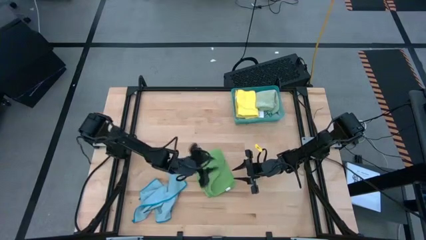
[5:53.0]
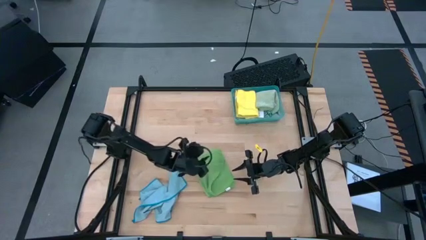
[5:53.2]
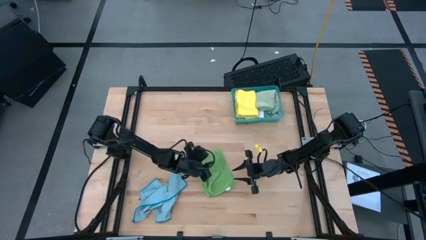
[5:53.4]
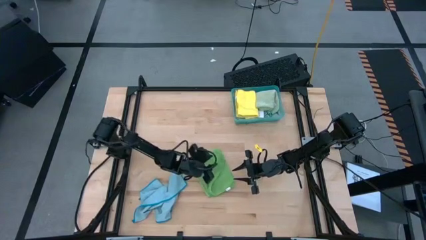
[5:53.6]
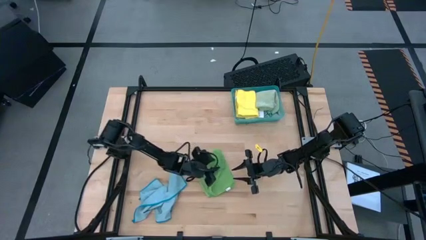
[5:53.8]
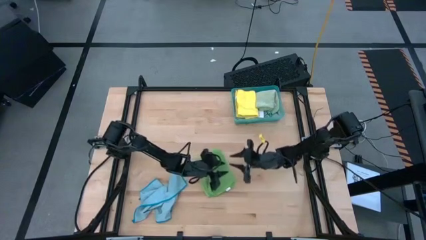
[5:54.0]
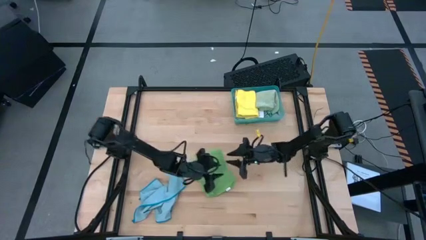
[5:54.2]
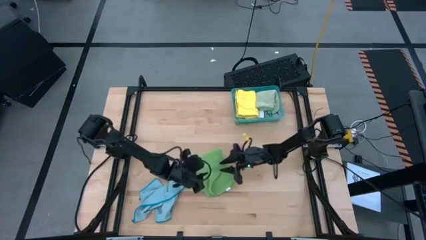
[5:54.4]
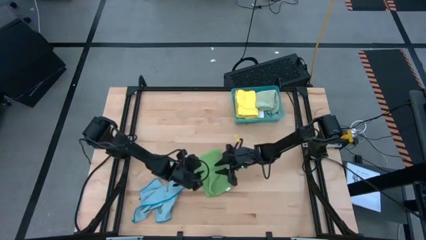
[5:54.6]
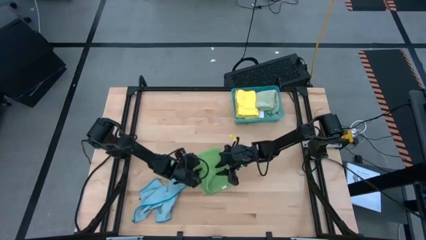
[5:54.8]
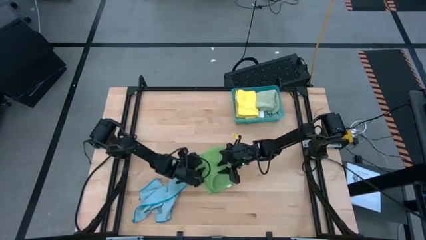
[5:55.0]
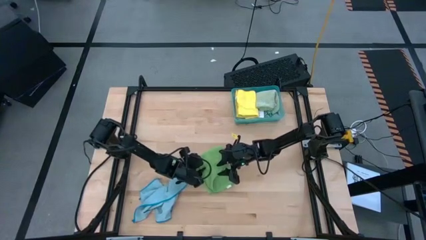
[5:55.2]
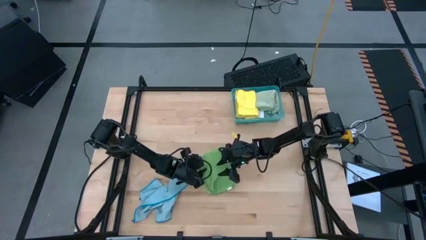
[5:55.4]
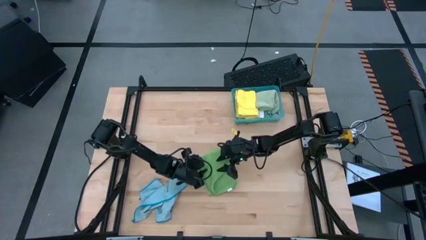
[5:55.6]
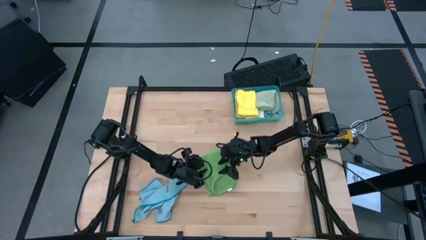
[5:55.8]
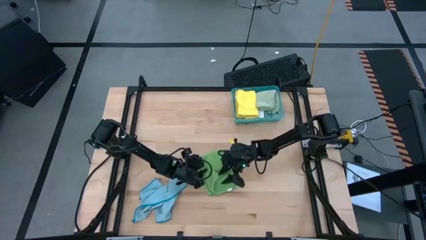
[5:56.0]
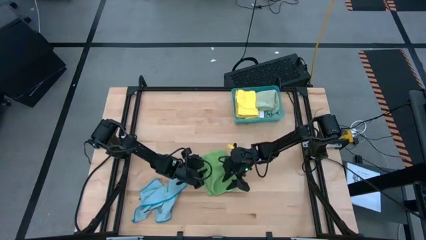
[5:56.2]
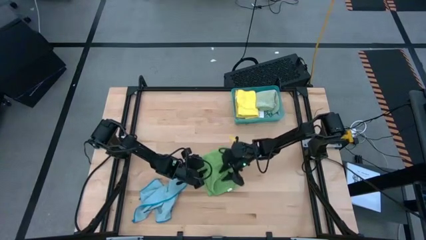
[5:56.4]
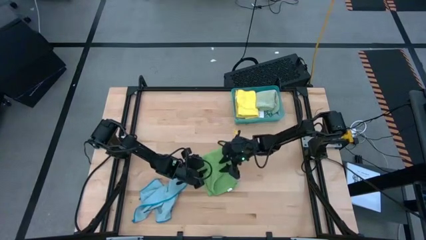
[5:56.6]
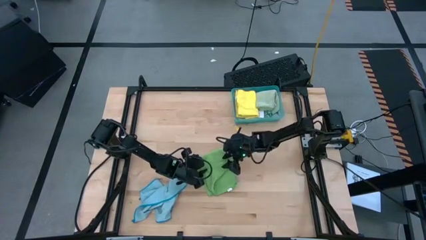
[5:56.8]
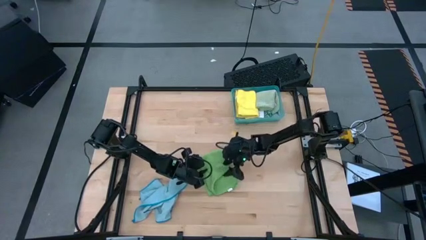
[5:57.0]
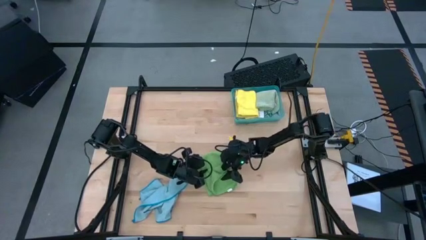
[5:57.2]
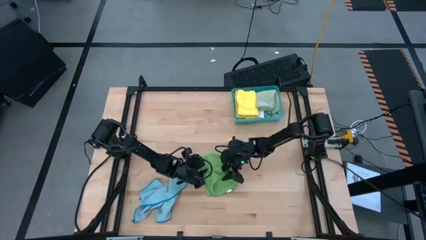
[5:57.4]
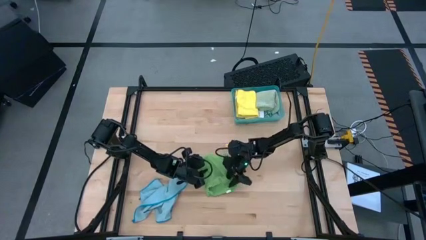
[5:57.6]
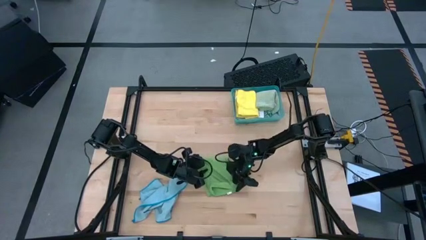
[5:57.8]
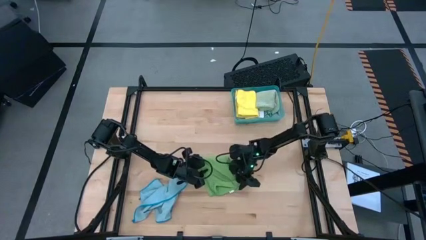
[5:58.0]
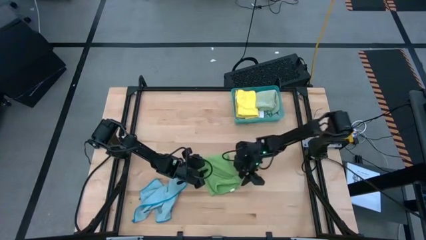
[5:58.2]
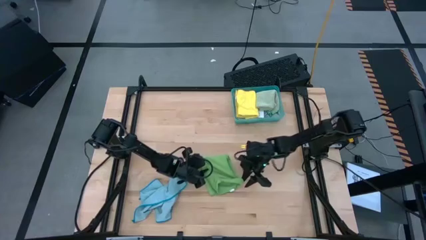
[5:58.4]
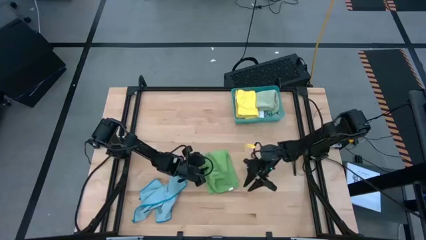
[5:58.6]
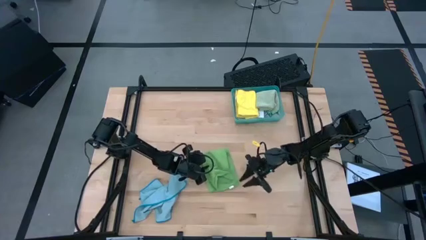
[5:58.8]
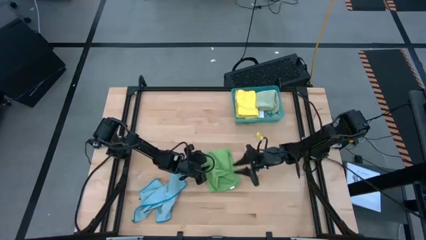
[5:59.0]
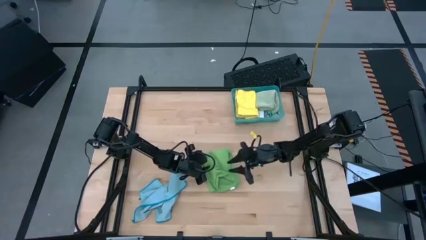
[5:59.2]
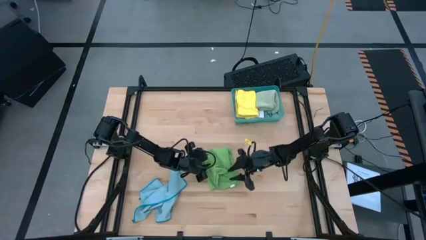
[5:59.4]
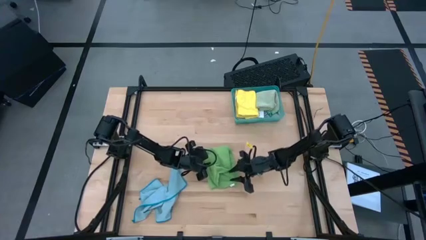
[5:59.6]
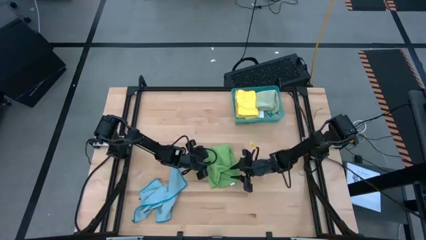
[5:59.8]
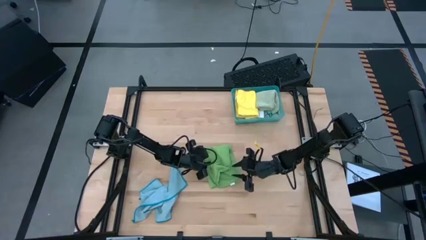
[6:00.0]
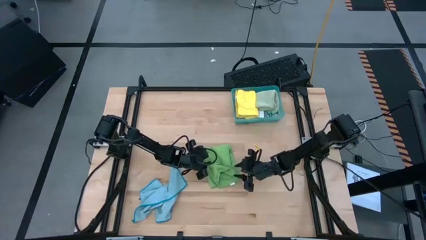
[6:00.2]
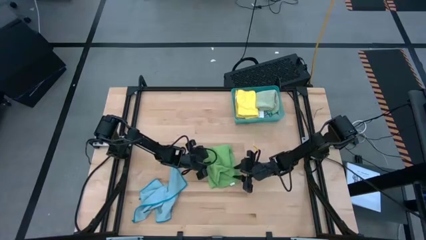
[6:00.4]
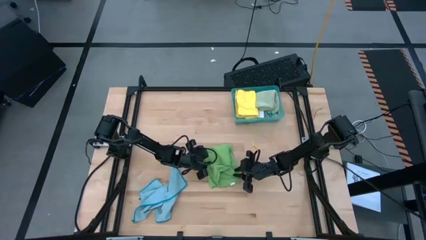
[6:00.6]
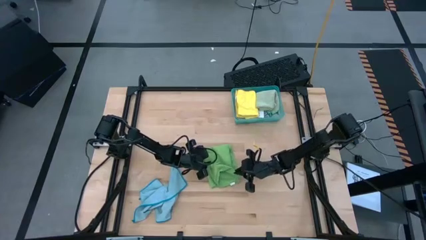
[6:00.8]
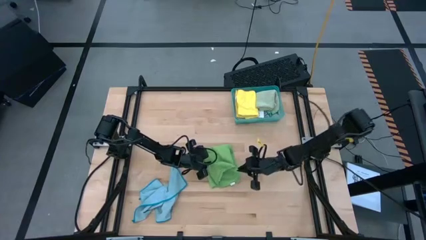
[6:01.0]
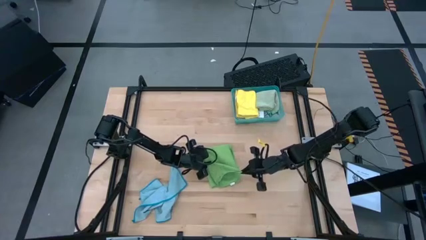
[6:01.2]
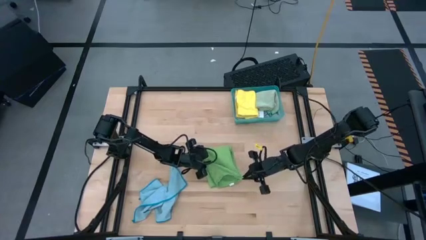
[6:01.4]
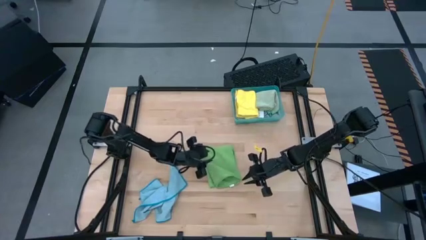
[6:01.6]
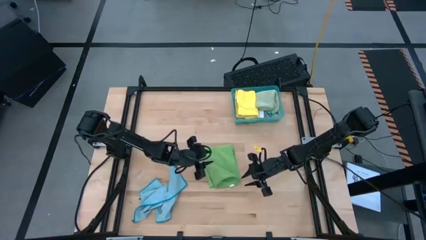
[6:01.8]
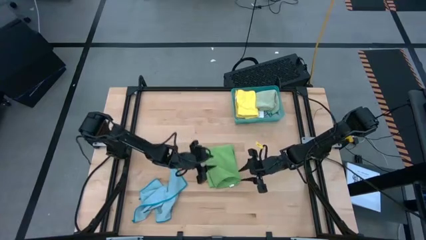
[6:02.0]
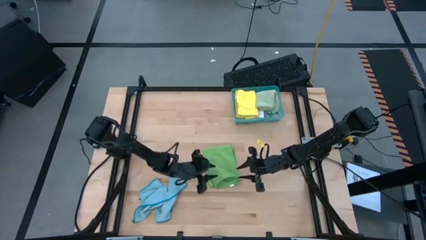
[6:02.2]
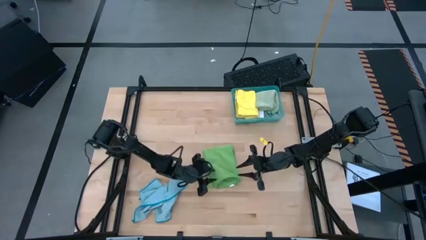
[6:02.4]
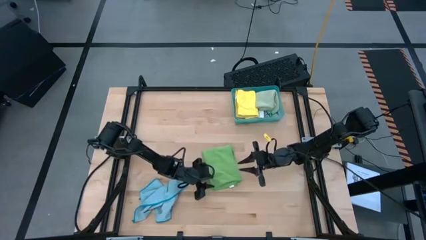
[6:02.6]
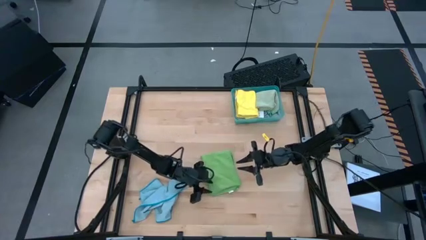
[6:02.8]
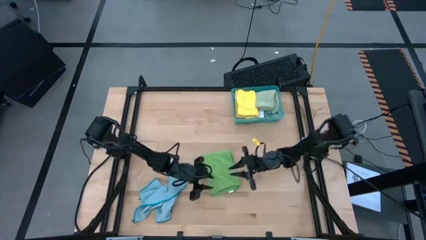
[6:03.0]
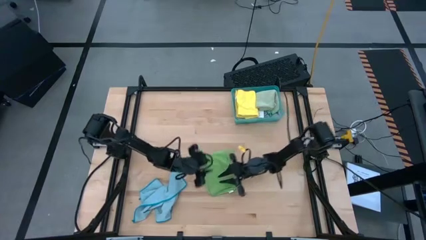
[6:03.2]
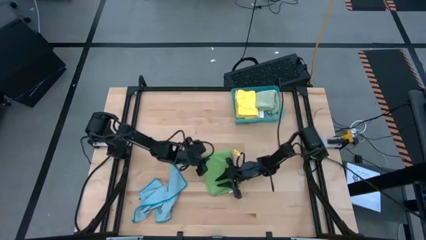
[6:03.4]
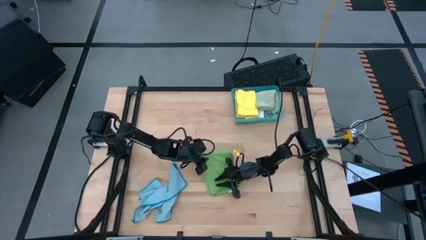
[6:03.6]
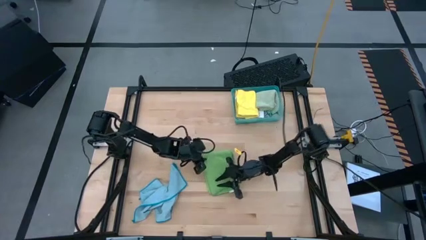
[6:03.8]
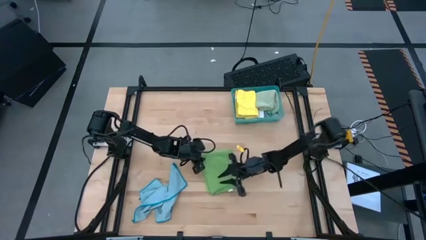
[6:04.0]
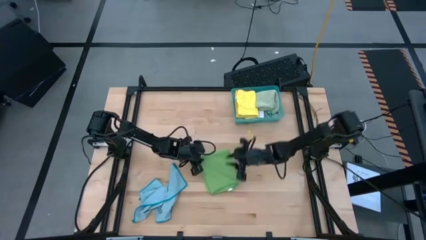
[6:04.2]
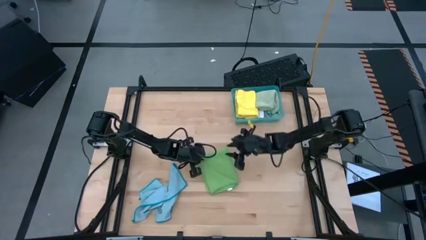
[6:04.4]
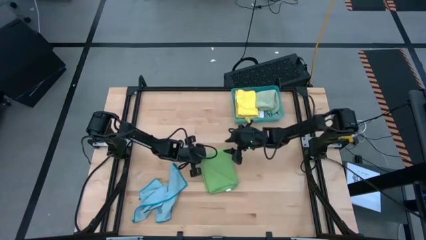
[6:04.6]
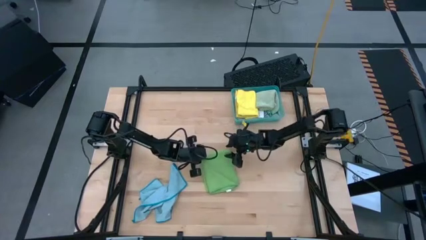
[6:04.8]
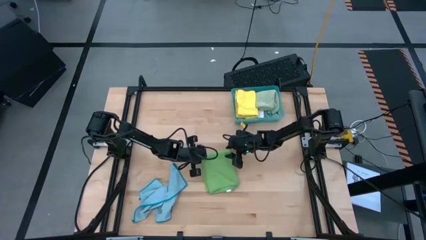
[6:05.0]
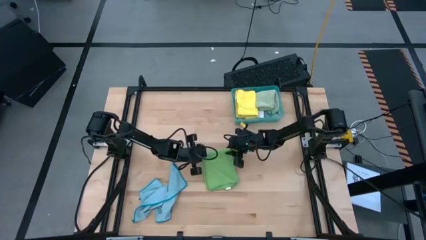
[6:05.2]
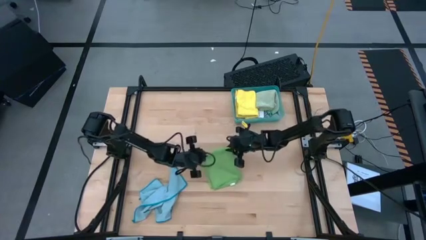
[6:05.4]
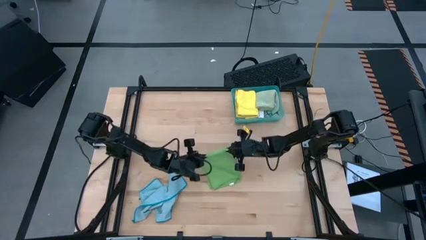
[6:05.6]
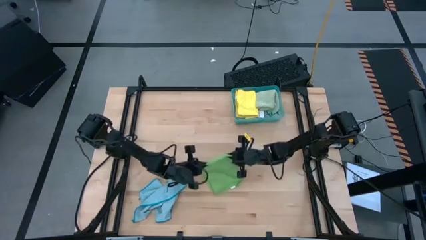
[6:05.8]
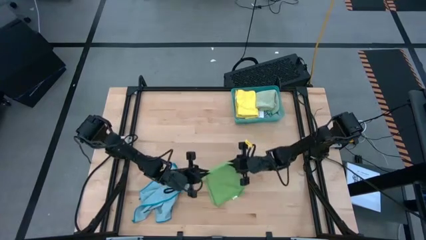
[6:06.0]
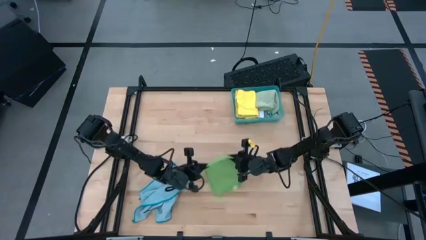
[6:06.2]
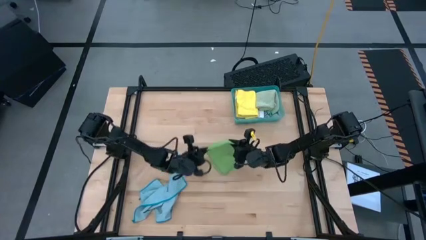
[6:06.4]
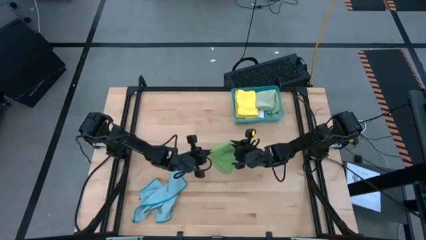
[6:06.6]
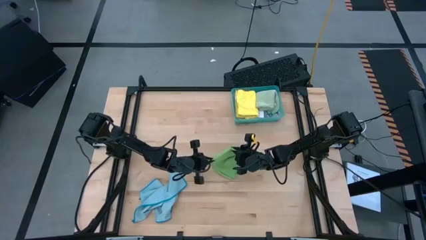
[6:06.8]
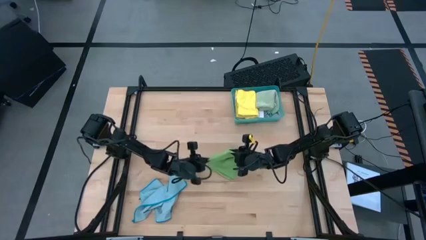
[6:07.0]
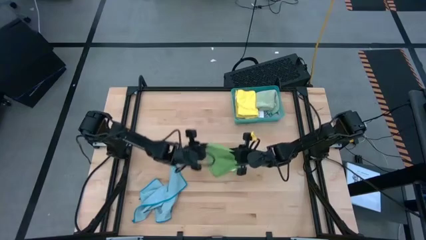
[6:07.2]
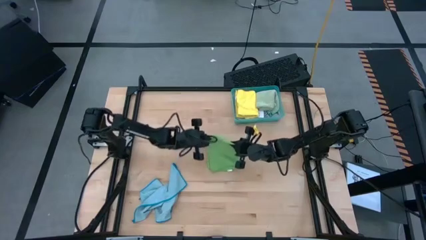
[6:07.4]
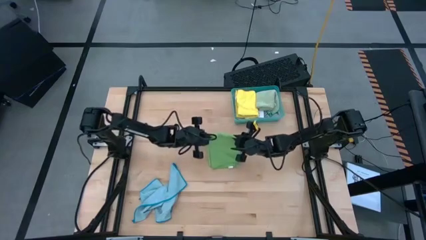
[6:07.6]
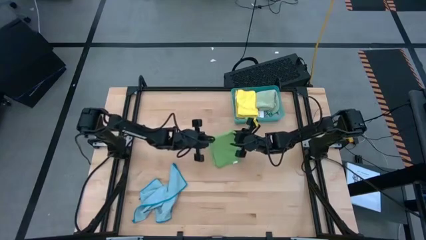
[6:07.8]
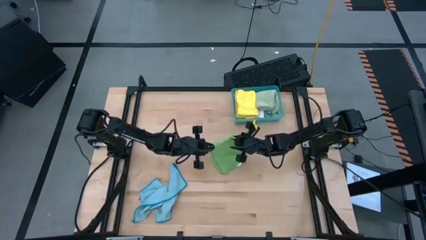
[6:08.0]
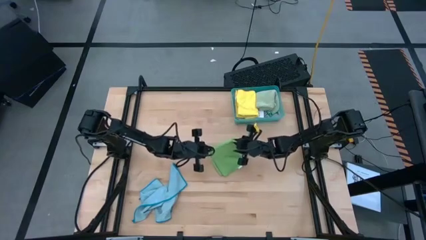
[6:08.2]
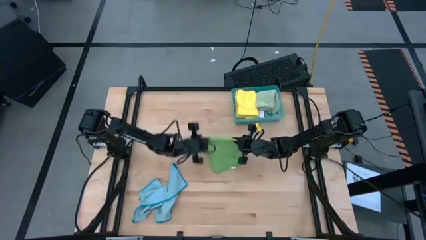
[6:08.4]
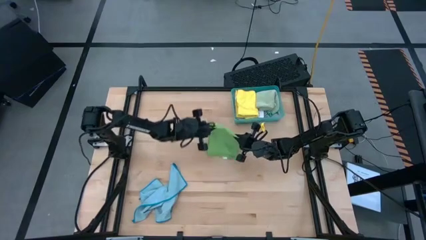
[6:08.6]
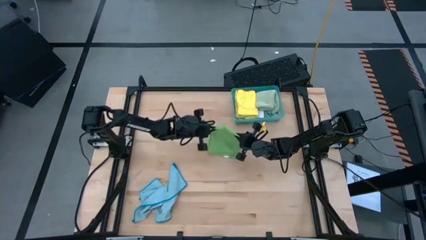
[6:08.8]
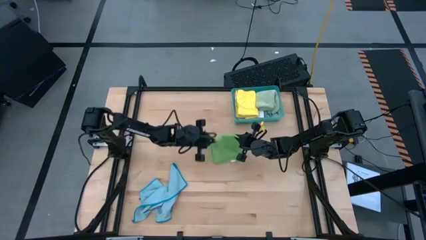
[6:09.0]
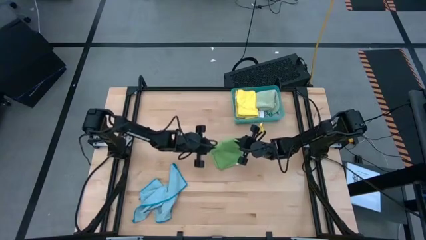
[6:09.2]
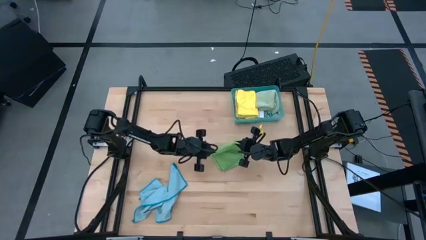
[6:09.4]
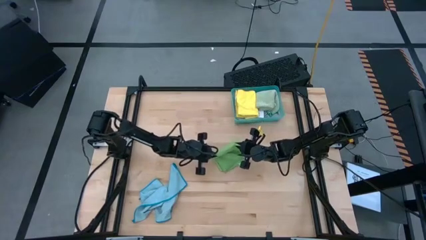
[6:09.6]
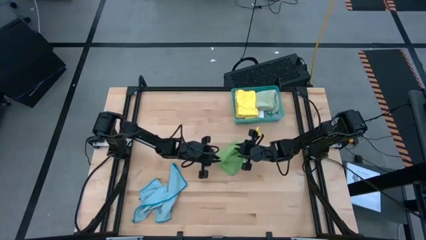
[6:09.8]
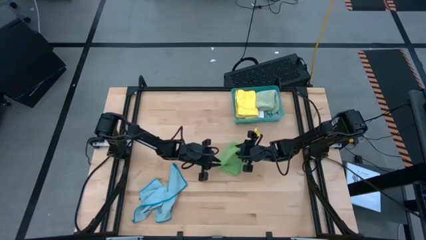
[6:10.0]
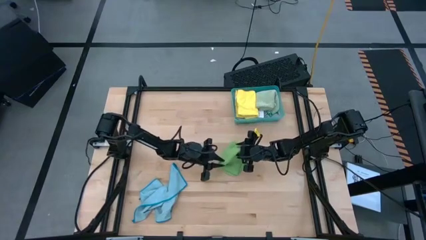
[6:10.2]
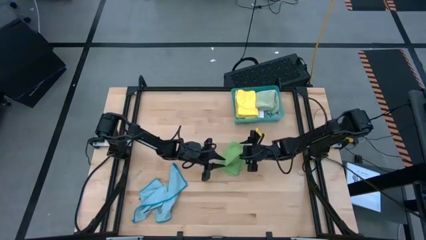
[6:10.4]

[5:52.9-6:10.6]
Task: Fold microfiber towels
Fold the green microfiber cloth
